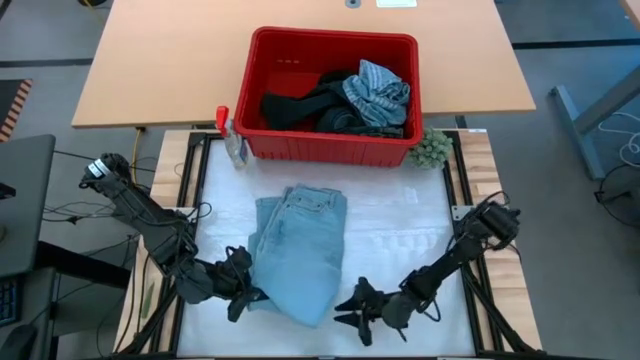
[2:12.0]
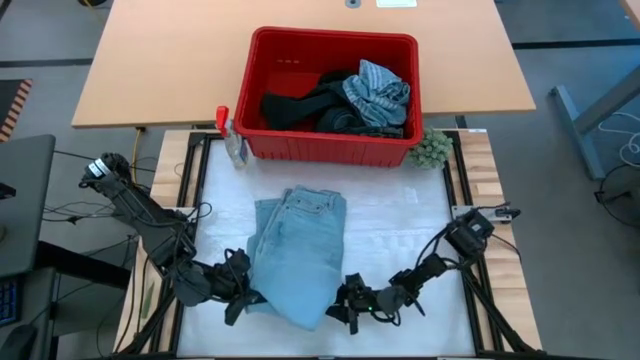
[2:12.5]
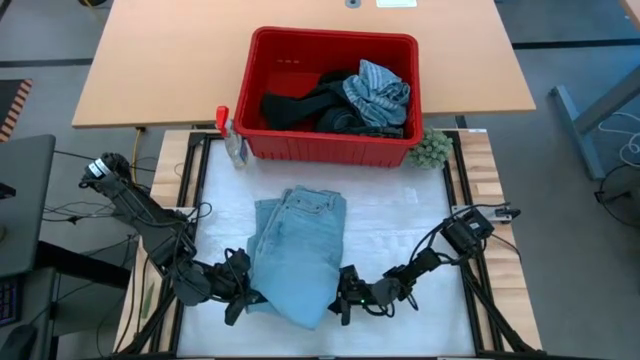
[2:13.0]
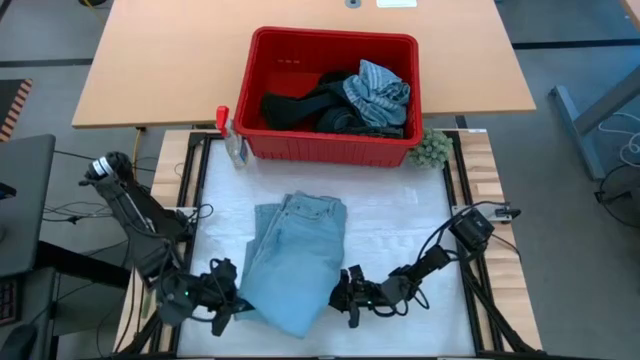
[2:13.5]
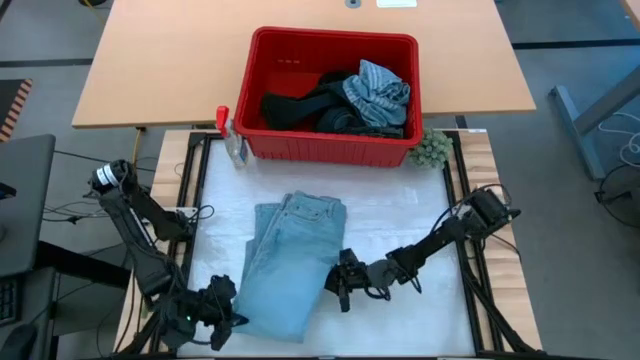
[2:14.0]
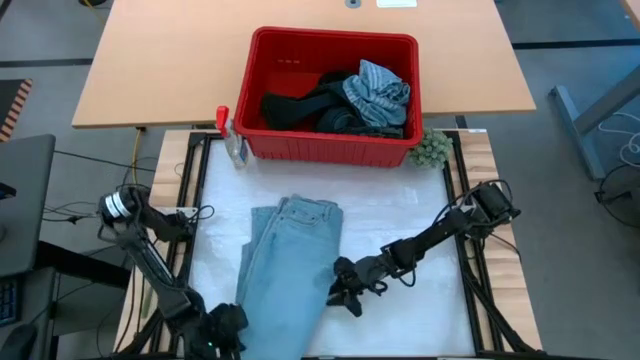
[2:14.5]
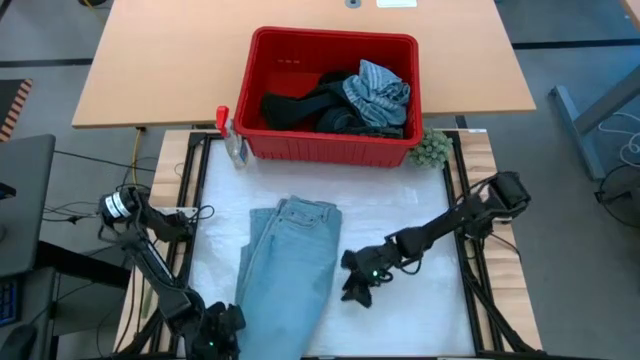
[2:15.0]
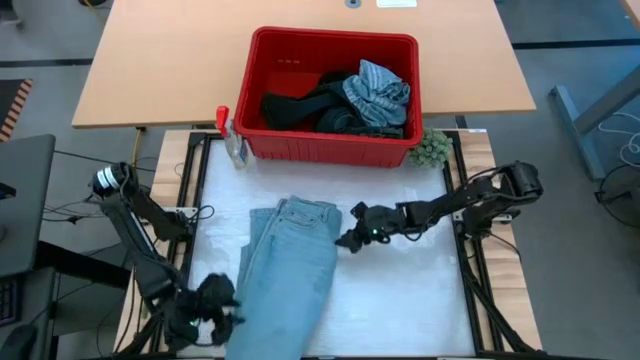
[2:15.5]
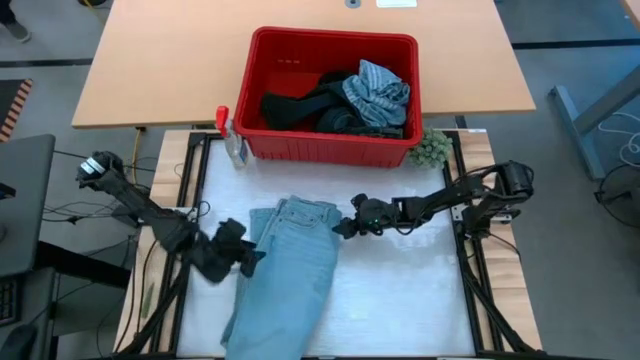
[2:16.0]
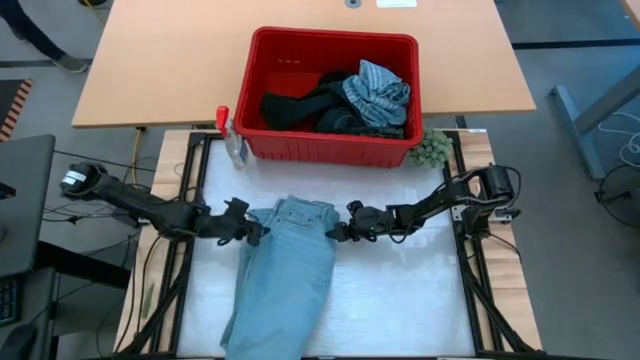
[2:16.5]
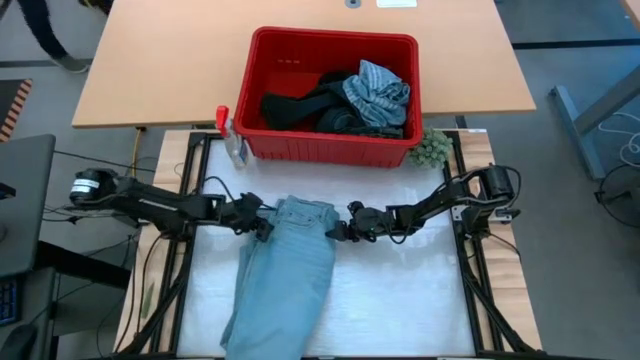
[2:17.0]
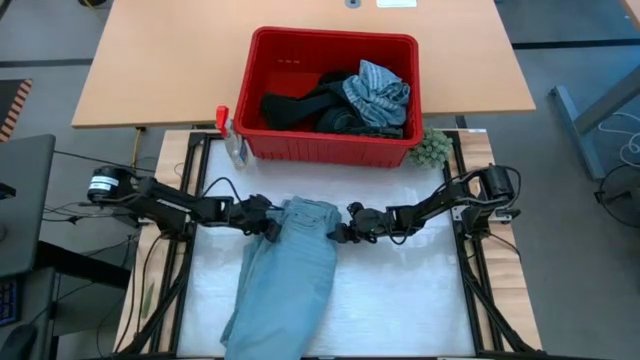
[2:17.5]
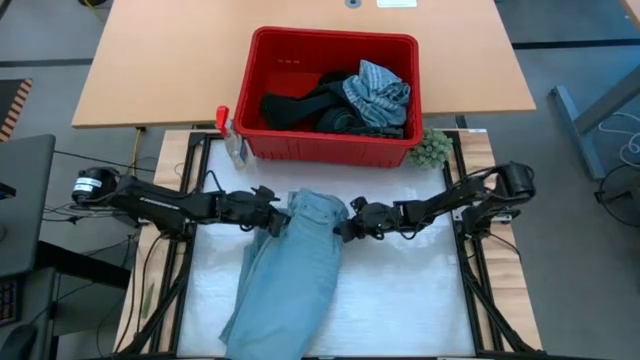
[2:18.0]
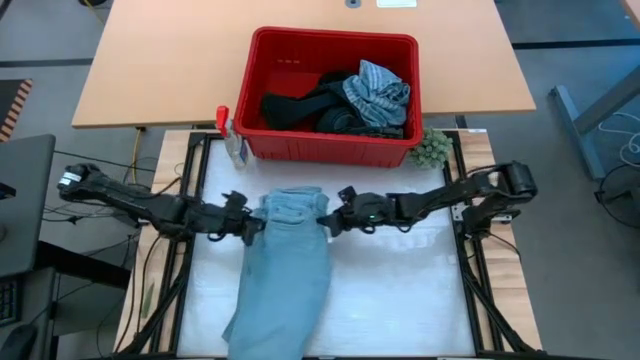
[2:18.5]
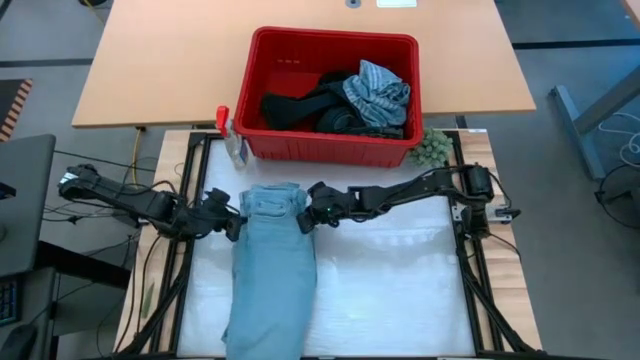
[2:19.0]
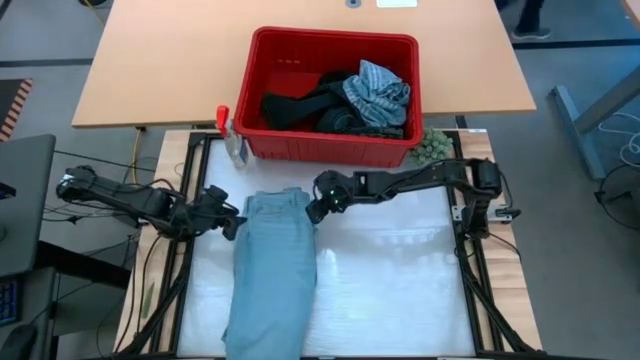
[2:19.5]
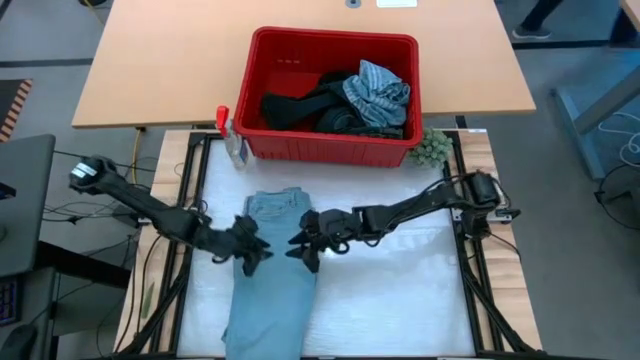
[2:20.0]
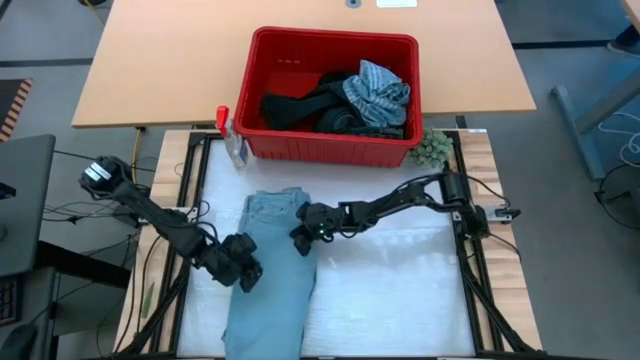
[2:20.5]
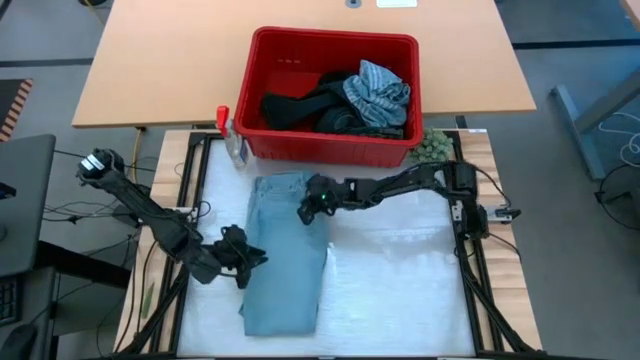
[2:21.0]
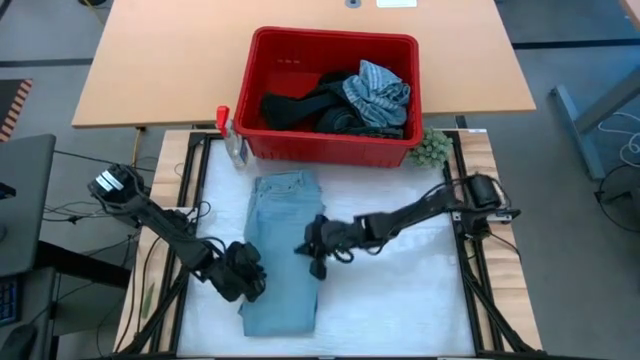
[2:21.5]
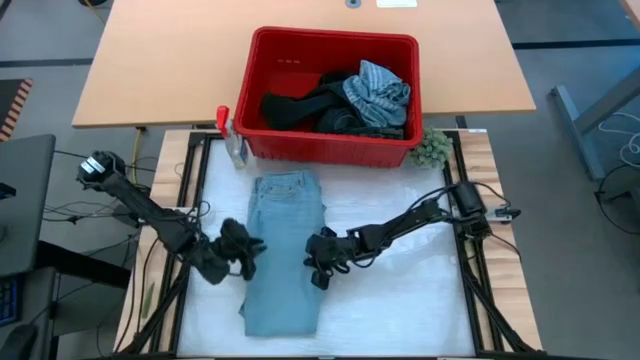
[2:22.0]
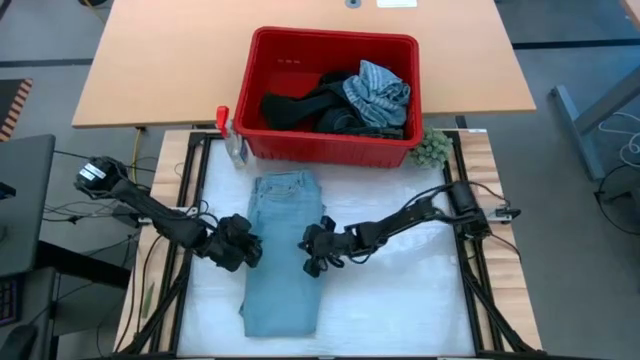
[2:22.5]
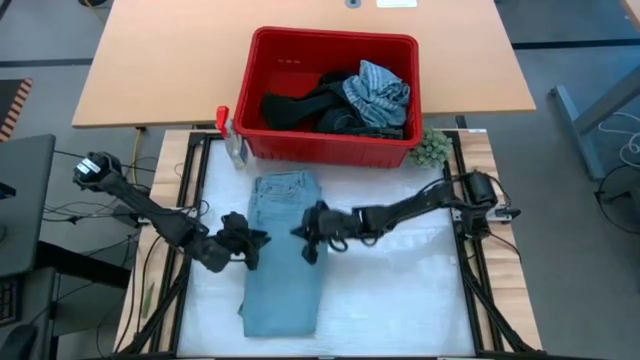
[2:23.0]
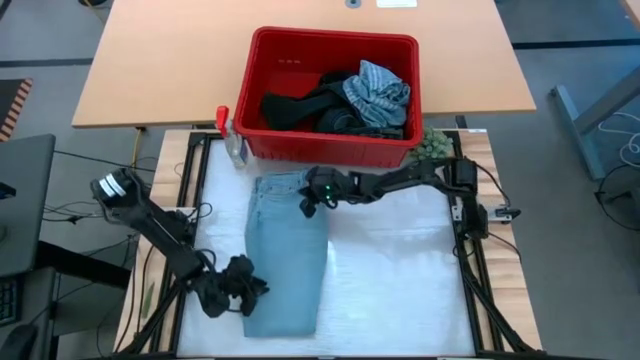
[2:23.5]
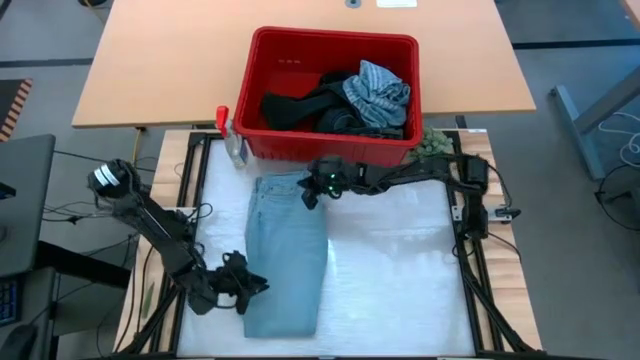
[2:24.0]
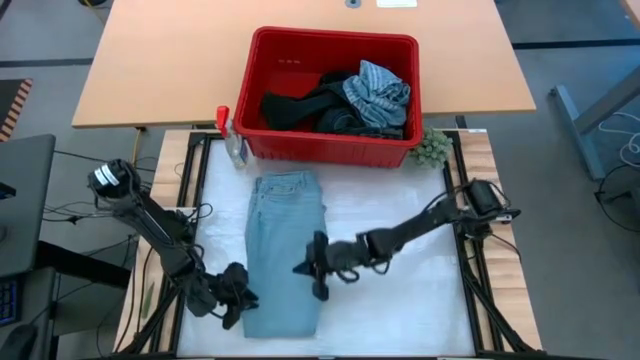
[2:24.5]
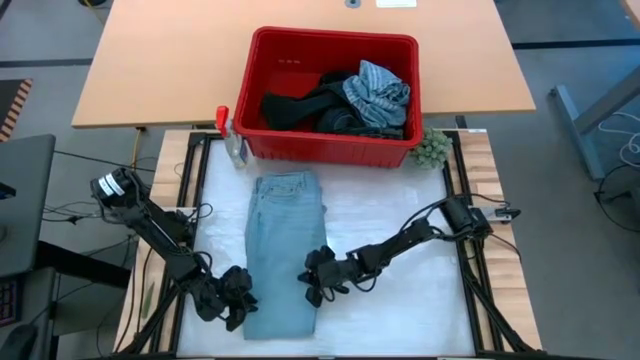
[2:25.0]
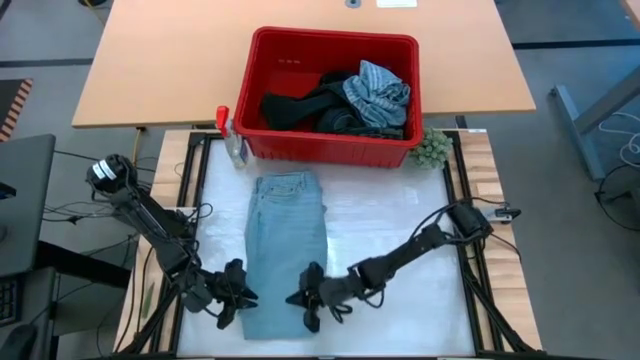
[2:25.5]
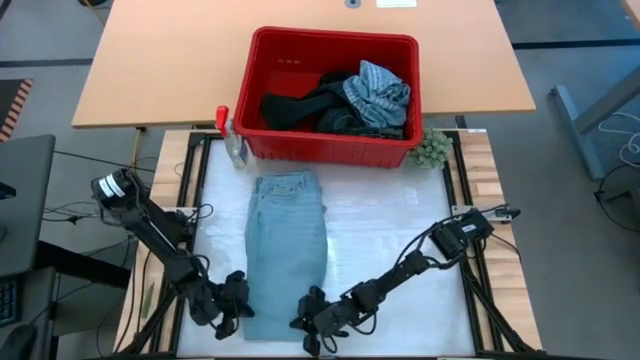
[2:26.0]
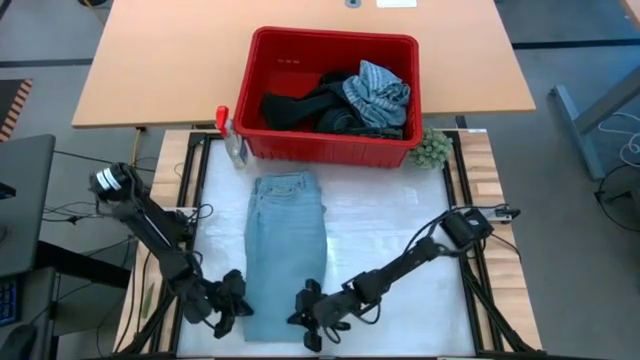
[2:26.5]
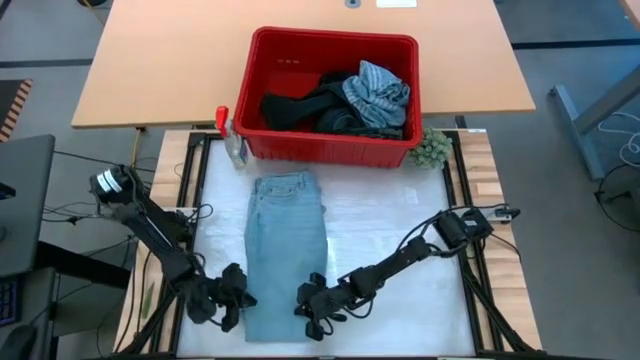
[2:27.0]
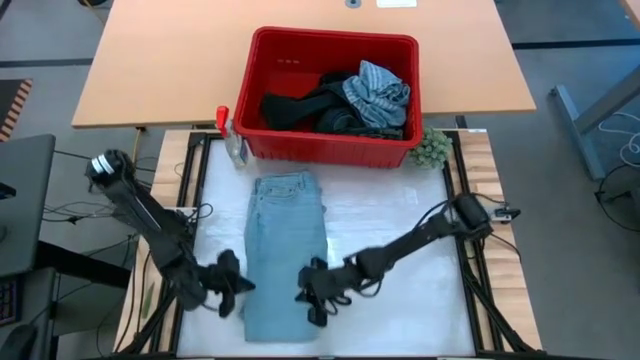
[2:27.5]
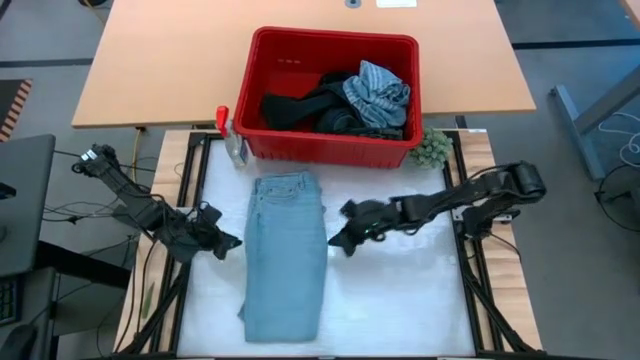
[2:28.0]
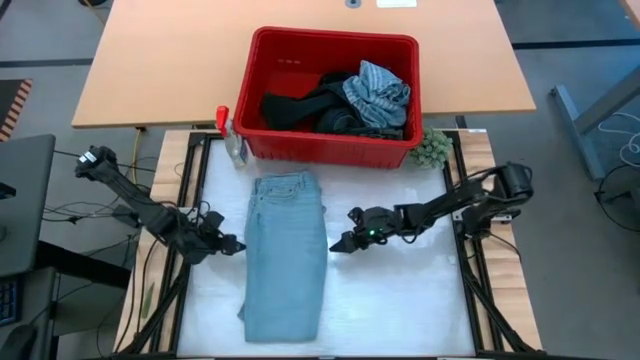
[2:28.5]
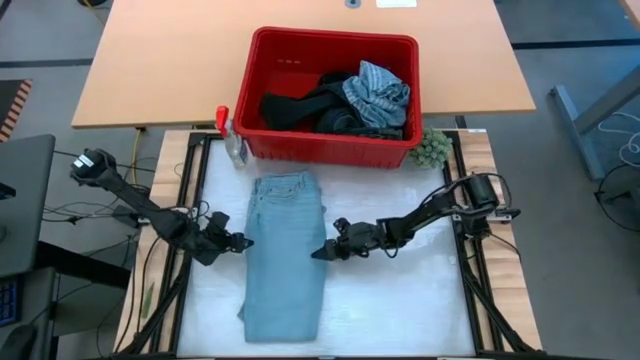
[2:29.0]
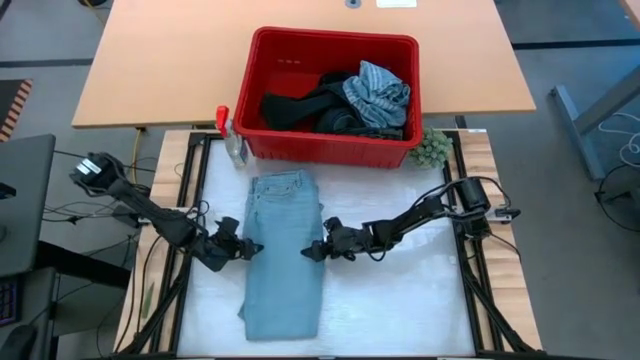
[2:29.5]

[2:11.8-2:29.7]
Task: Fold laundry
Fold the blue pants from the red laundry bin

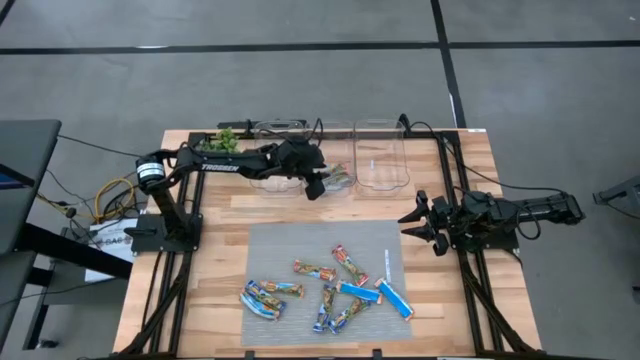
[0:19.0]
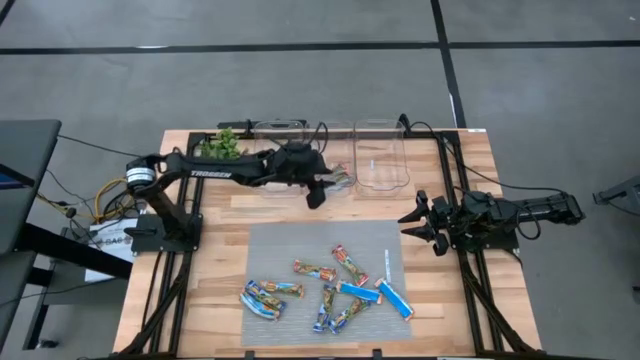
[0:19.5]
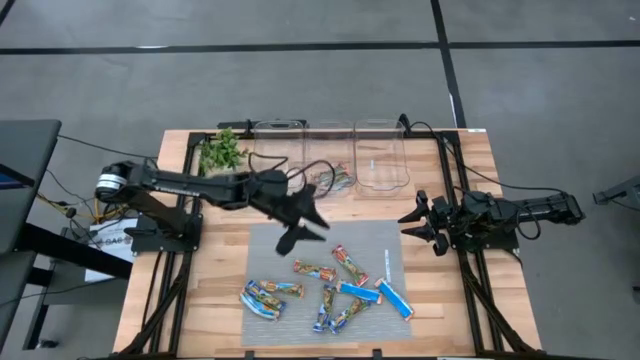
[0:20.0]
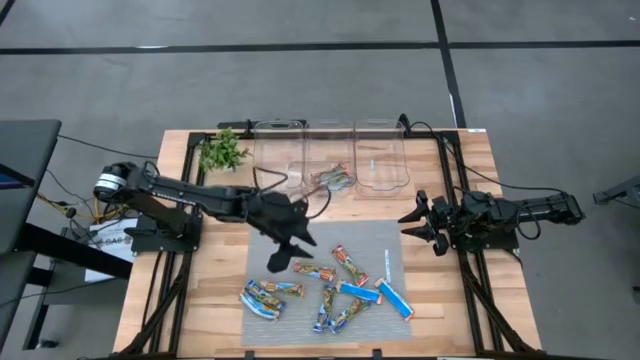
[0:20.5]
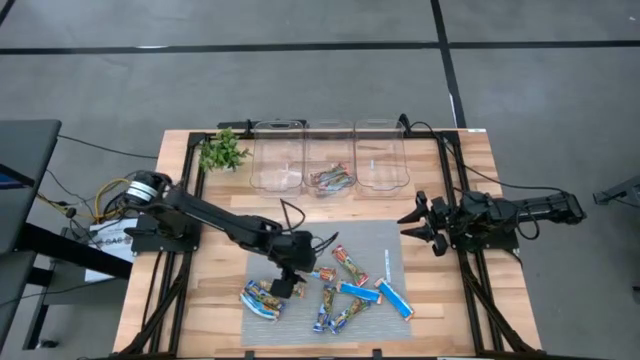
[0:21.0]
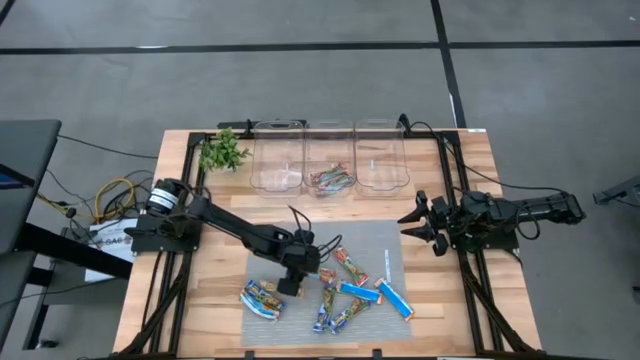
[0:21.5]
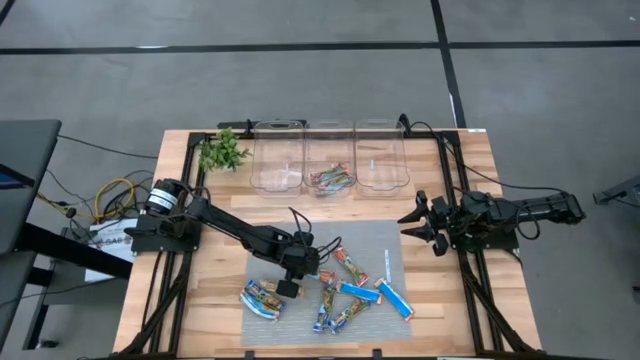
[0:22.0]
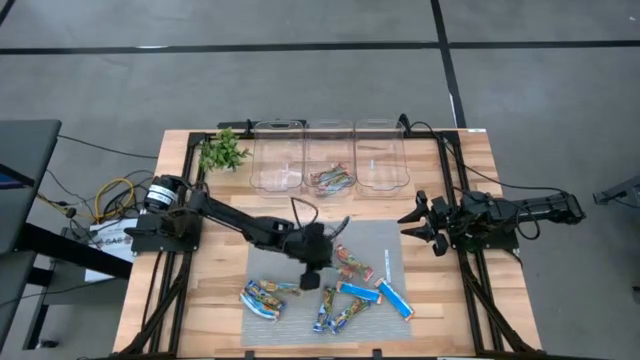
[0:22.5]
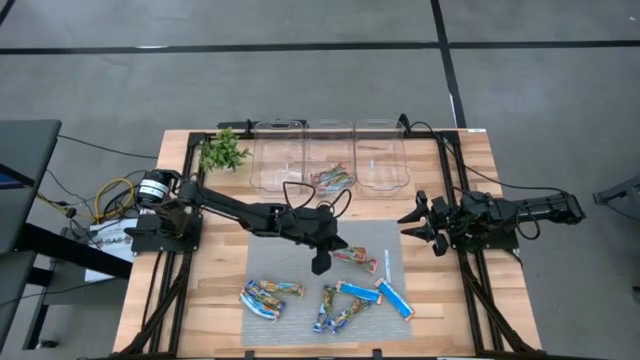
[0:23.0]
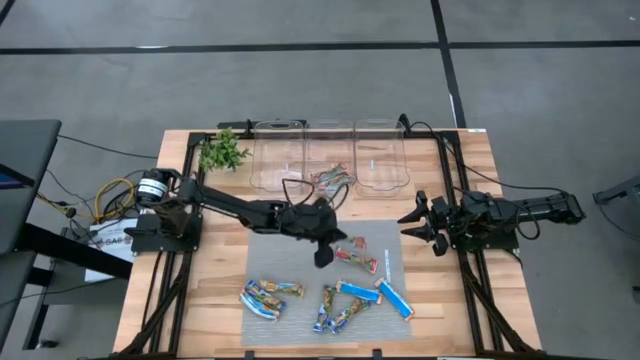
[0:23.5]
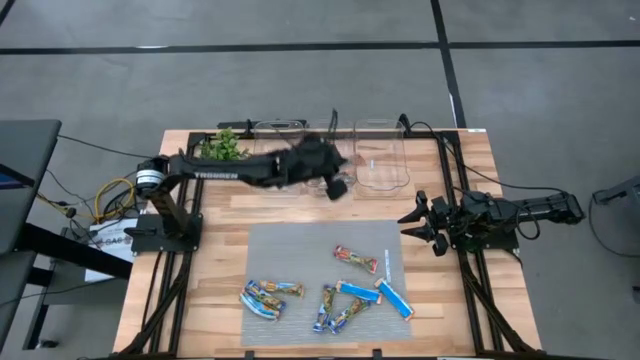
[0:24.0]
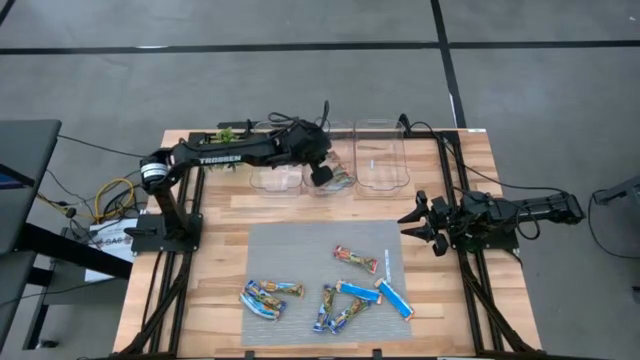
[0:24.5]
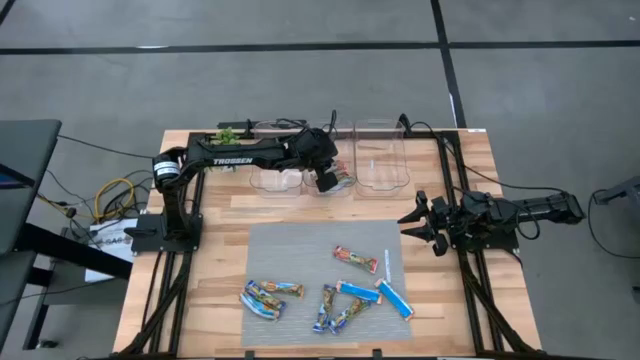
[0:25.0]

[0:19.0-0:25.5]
Task: Pick and place Granola Bars by type
Put the red granola bar into the middle transparent bin
